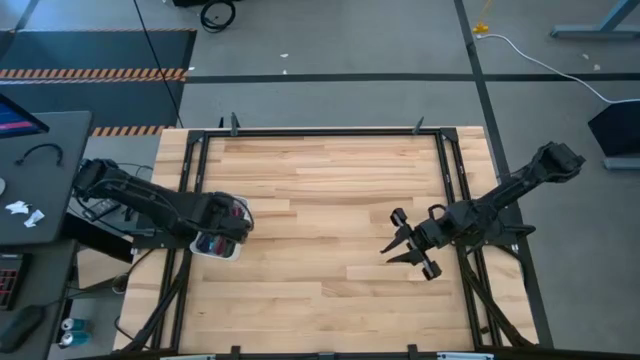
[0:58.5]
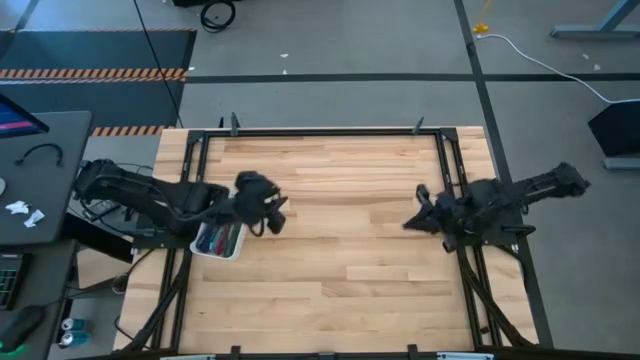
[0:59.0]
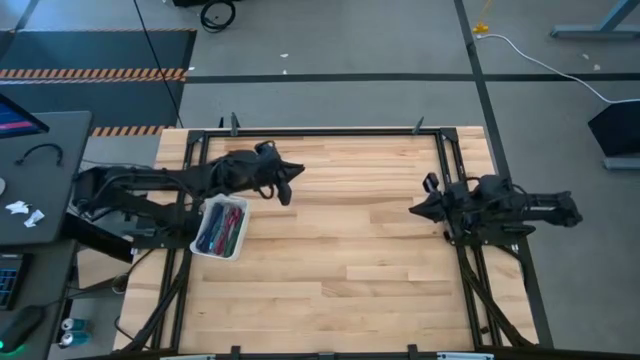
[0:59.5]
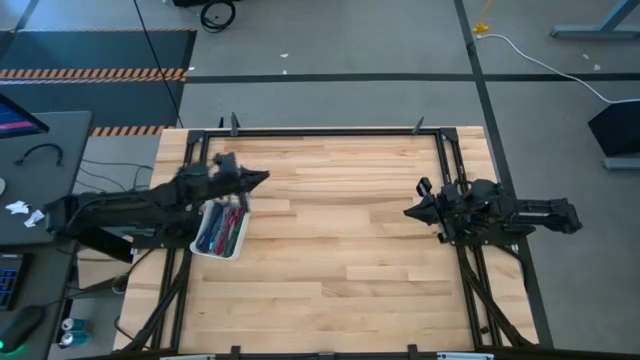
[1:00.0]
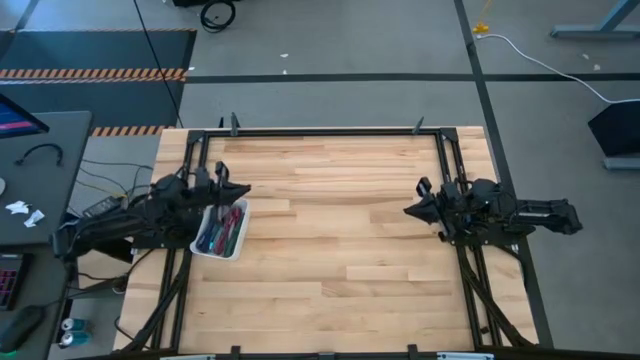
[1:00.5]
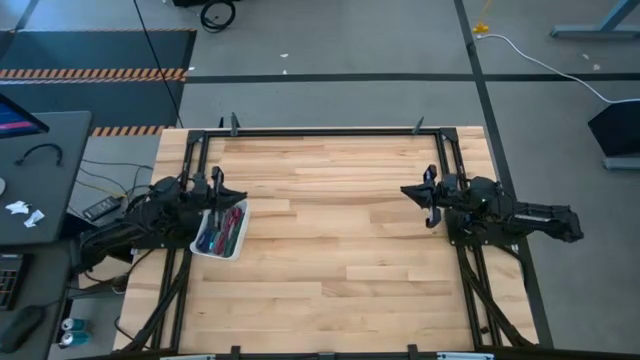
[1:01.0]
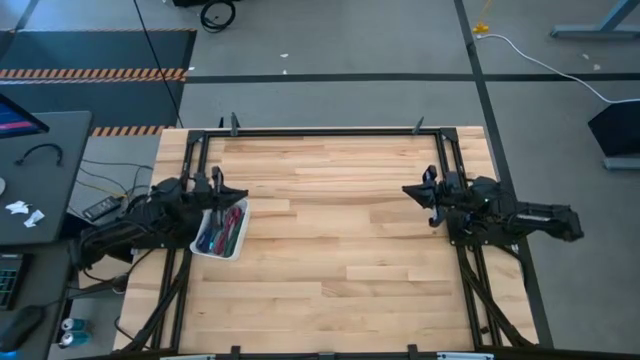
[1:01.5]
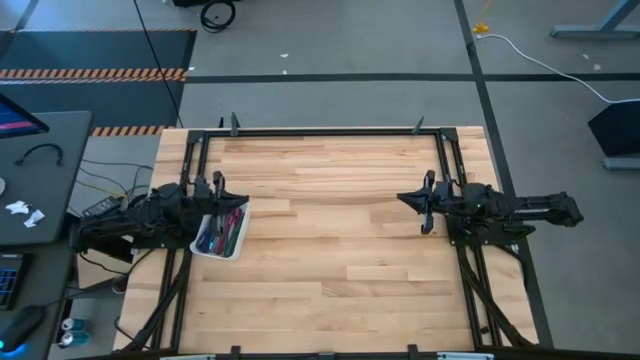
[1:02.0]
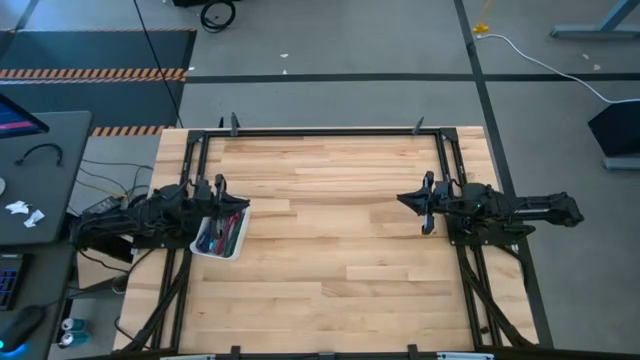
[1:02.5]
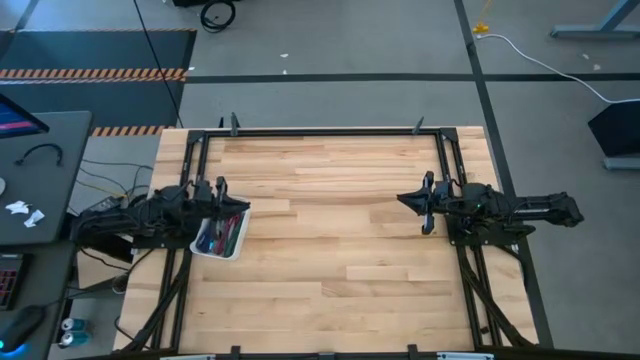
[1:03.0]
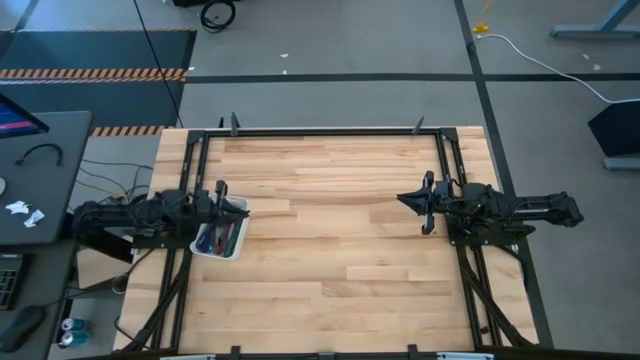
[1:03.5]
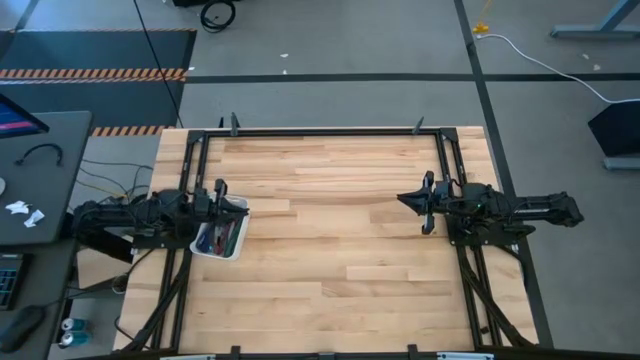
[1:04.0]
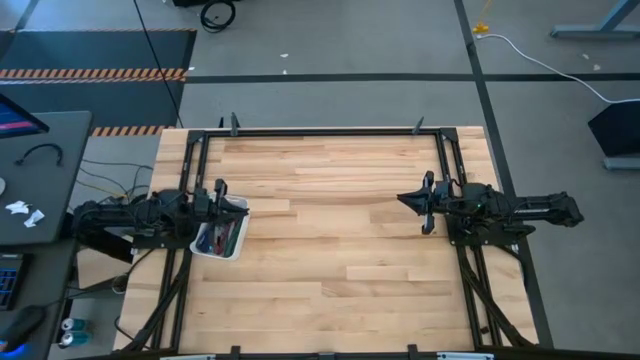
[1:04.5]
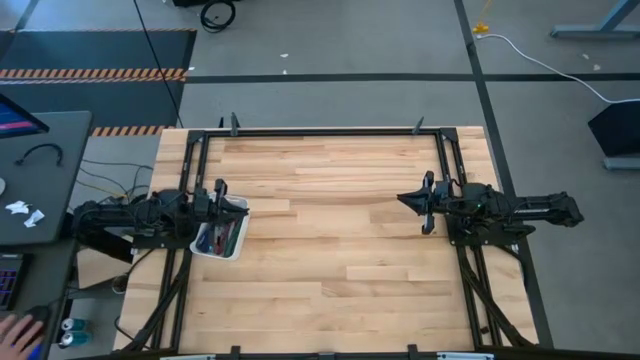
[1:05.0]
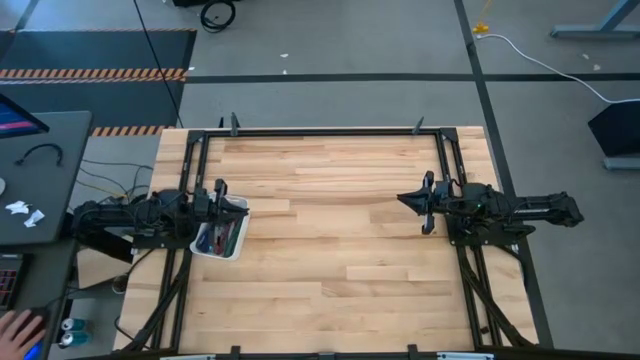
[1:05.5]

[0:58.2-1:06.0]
Task: Pick and place USB-C Cables
Return to Home Position

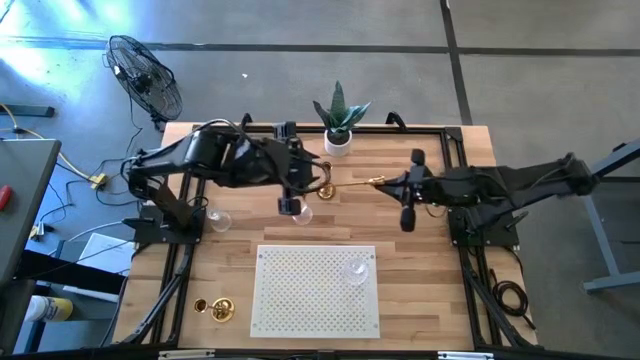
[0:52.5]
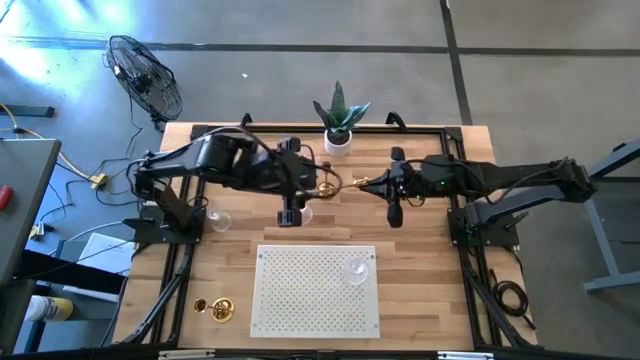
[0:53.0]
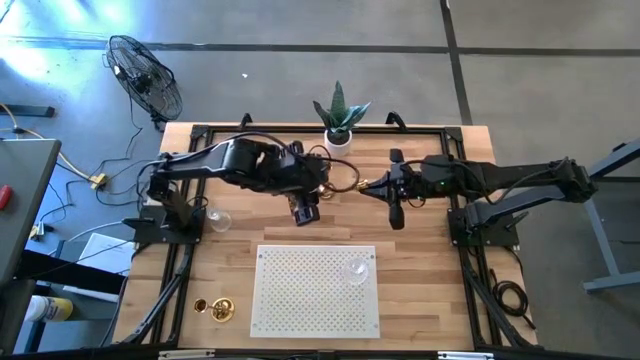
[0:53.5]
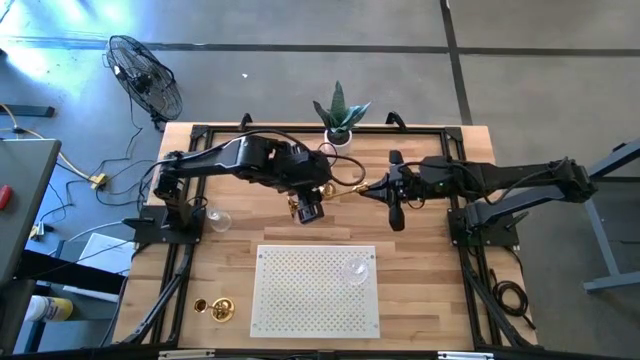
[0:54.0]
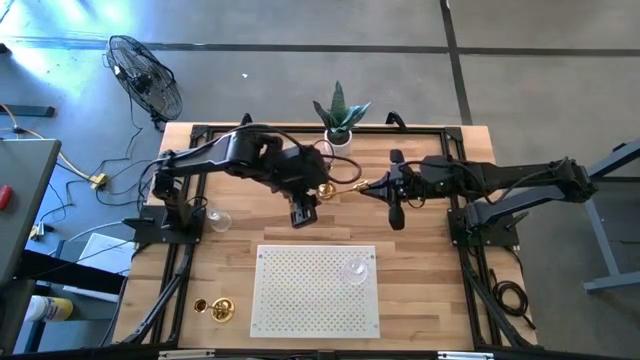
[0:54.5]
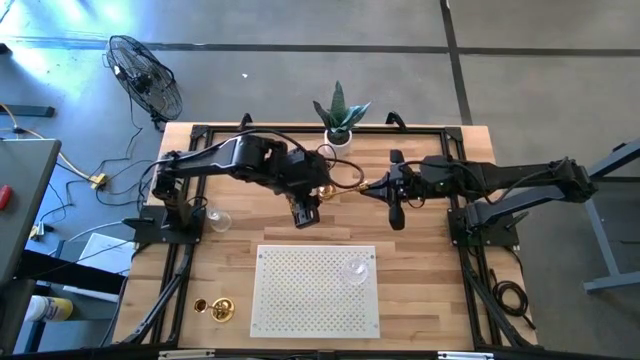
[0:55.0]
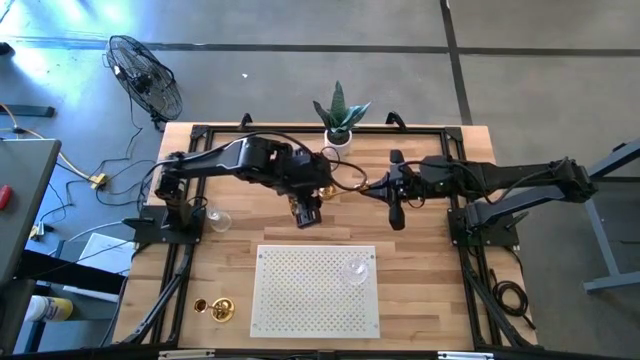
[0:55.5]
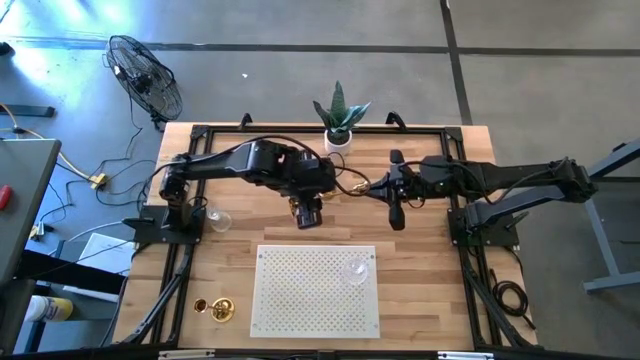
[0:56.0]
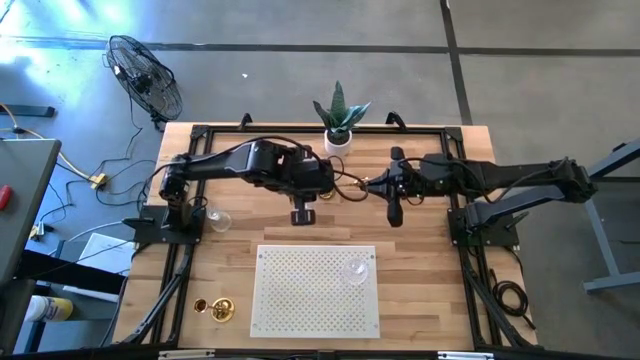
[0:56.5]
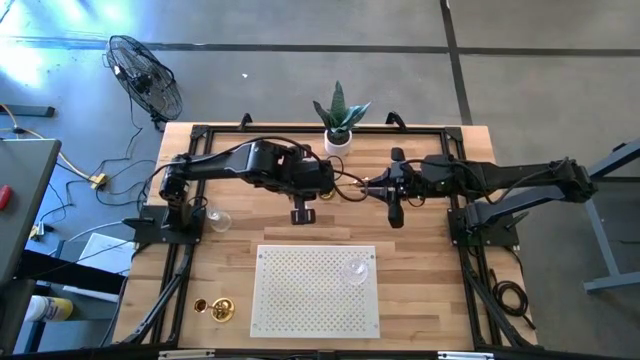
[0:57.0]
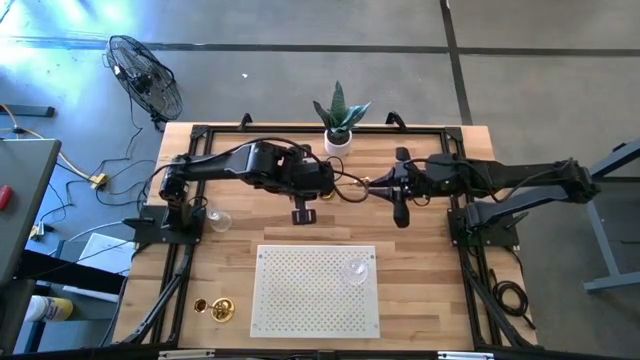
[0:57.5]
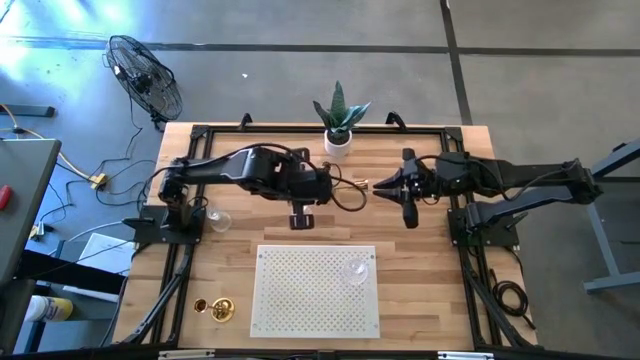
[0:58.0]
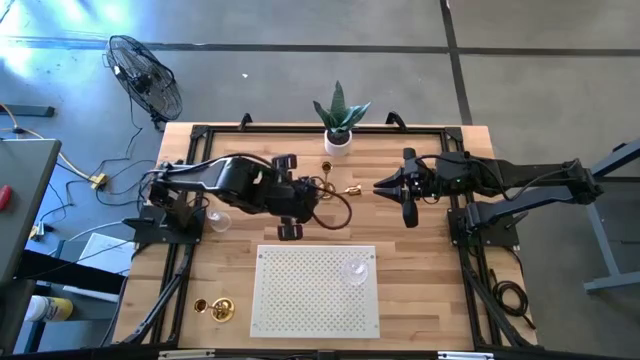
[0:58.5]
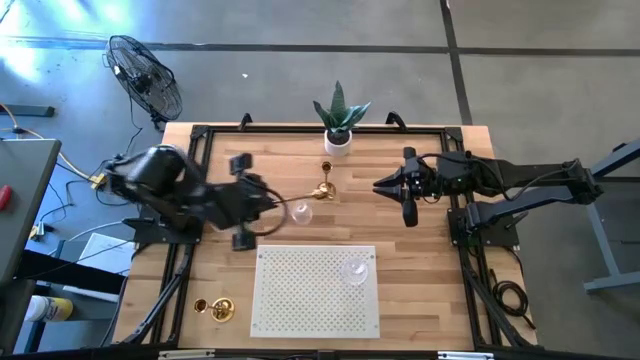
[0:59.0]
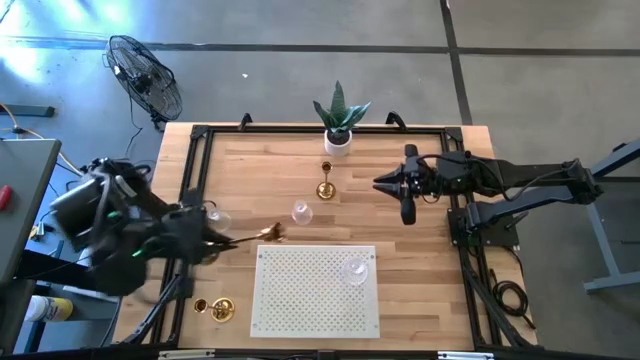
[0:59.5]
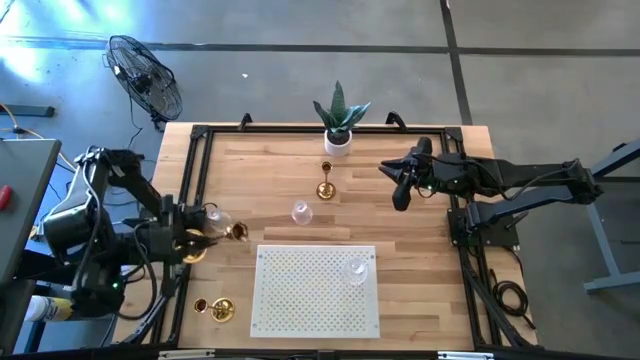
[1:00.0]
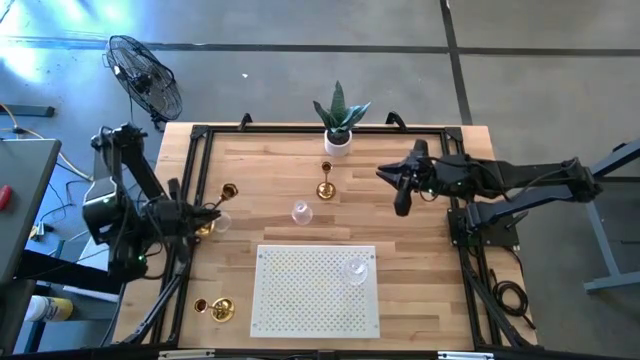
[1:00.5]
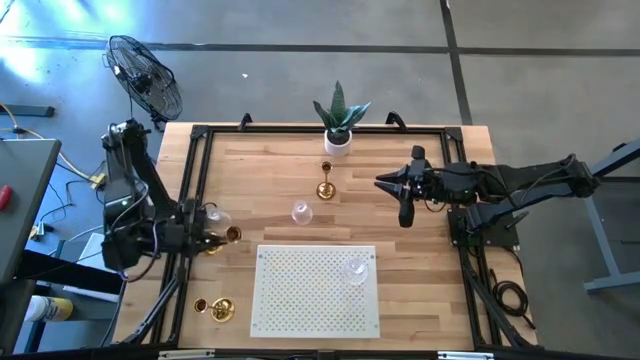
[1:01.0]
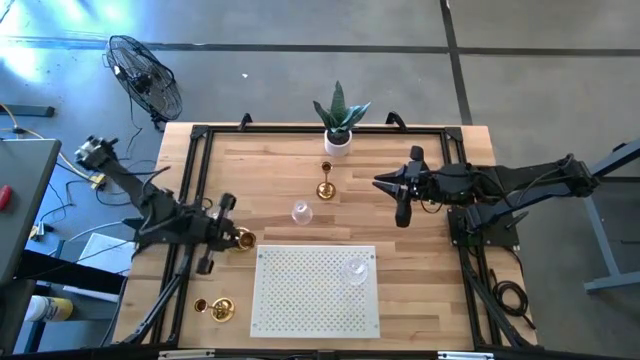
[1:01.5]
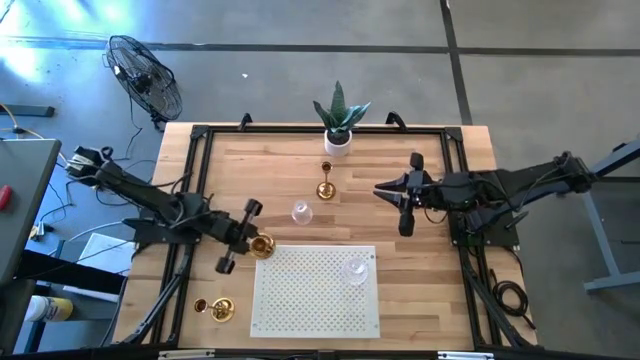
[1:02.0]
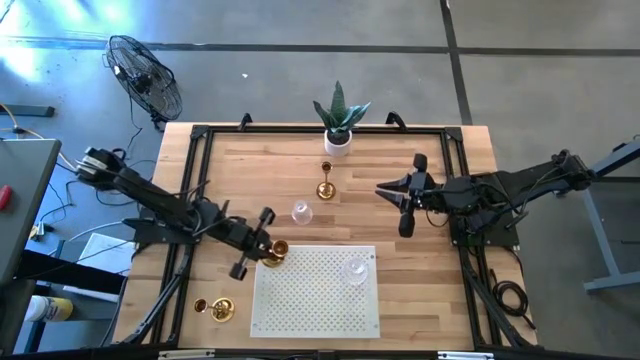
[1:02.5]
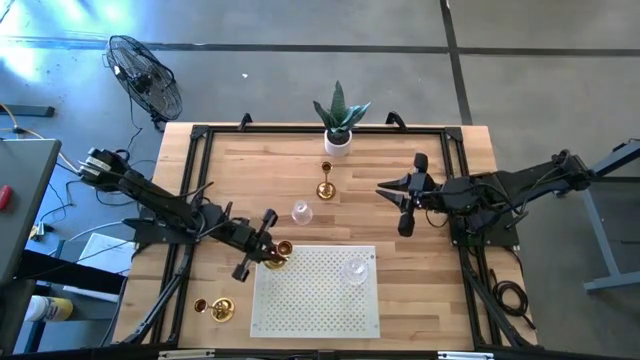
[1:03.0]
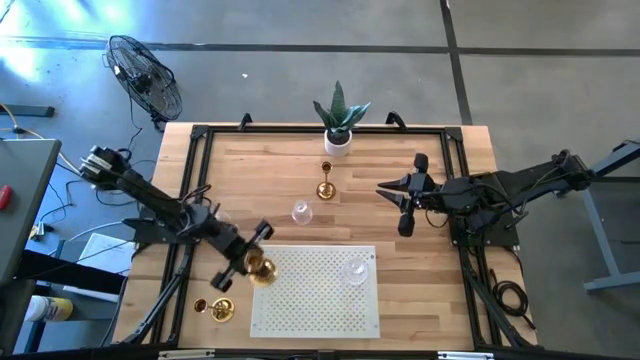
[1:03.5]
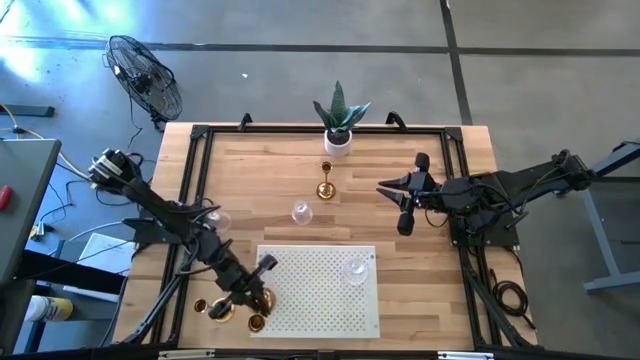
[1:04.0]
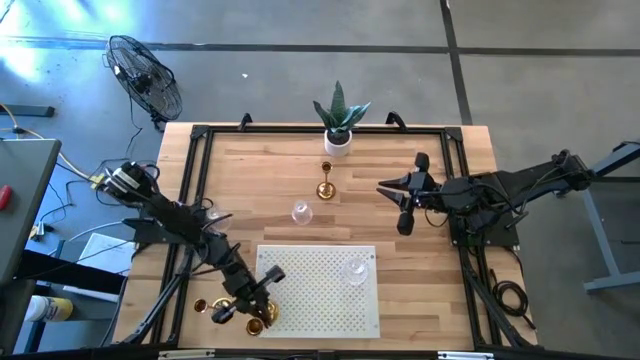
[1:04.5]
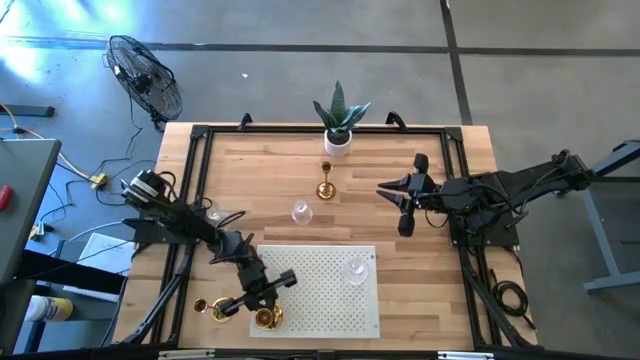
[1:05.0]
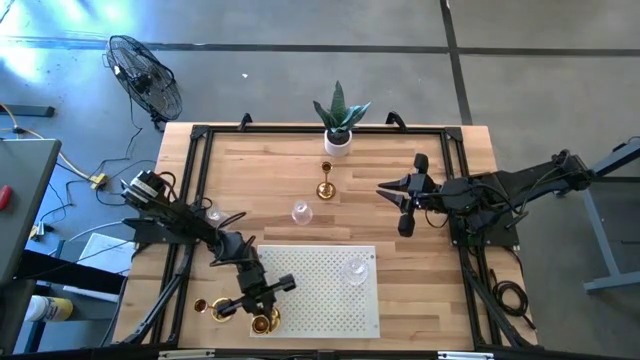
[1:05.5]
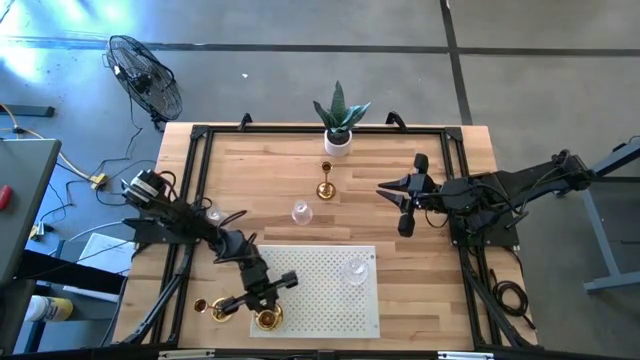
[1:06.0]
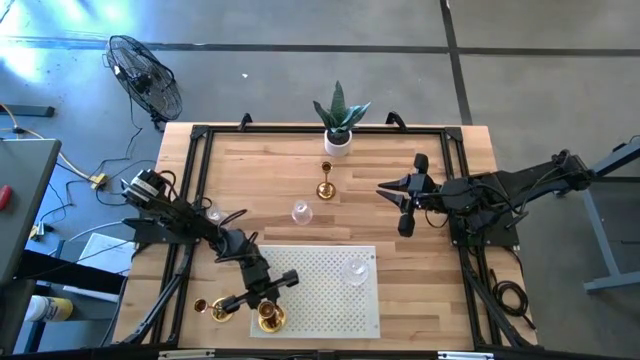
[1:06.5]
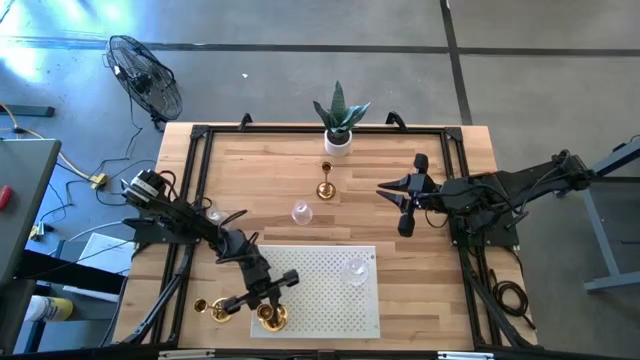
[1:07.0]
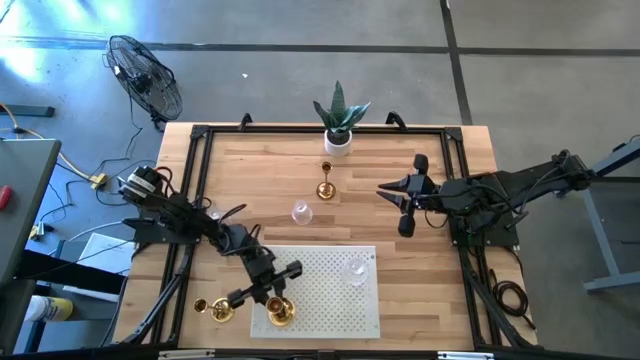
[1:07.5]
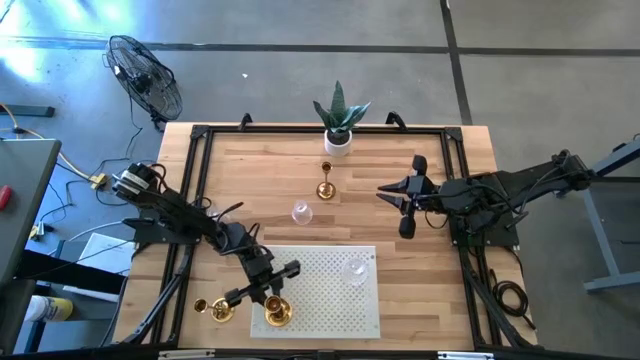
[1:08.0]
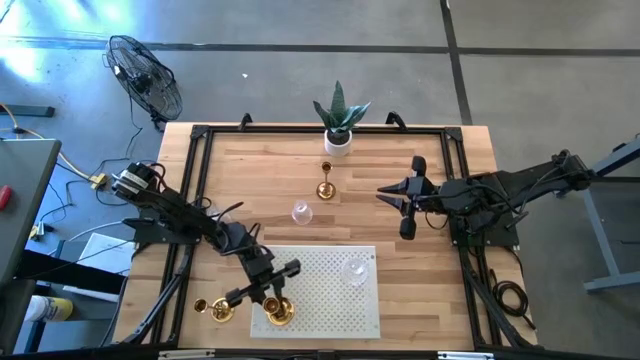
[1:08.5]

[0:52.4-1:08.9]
Task: Pick & Place candle stick holders
Put the bottom right gold candle holder on the shelf
